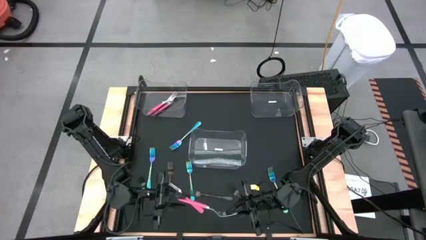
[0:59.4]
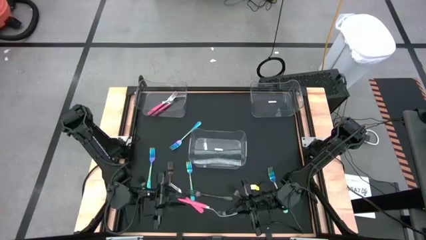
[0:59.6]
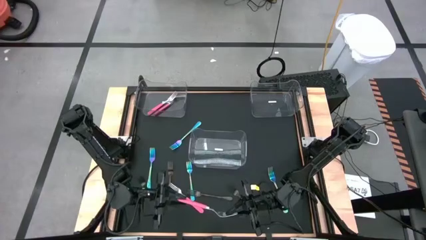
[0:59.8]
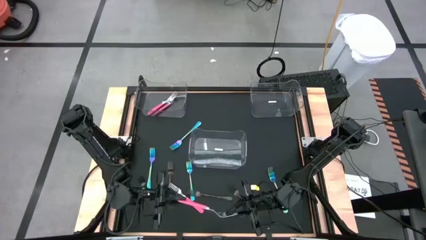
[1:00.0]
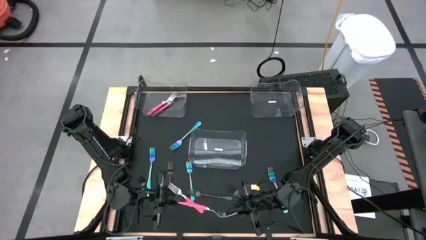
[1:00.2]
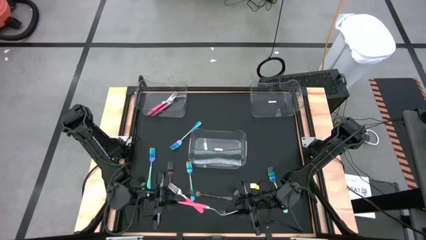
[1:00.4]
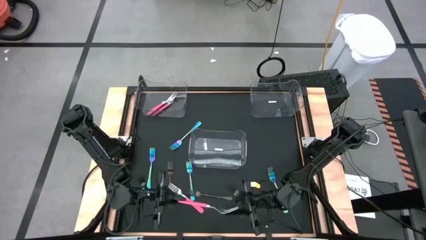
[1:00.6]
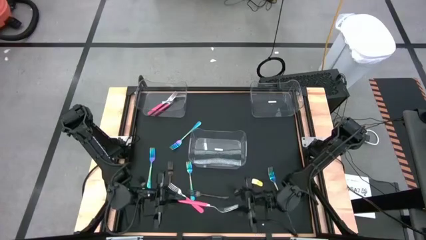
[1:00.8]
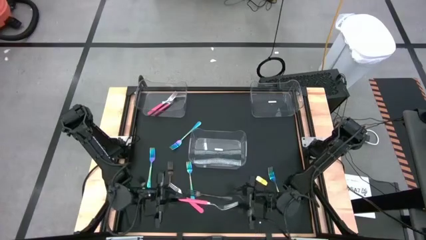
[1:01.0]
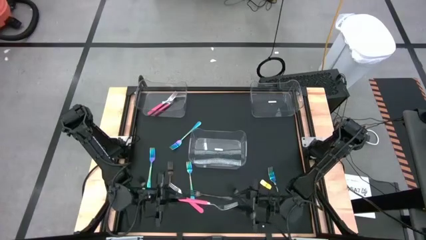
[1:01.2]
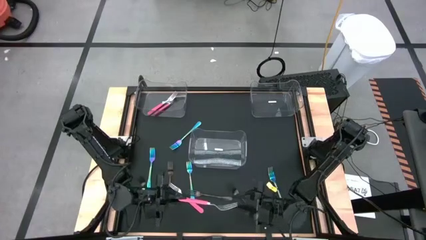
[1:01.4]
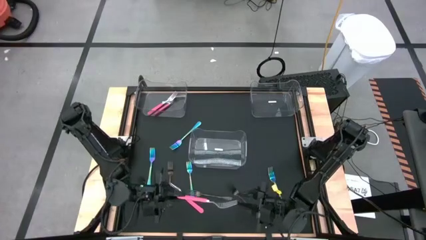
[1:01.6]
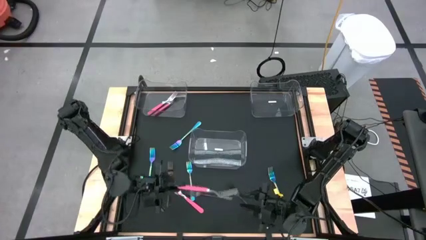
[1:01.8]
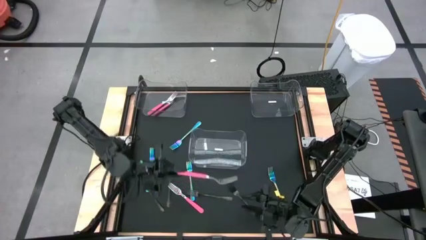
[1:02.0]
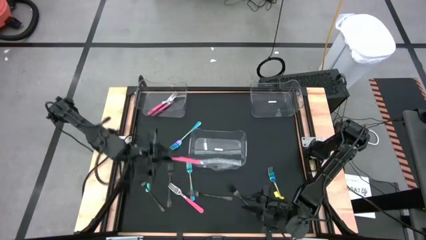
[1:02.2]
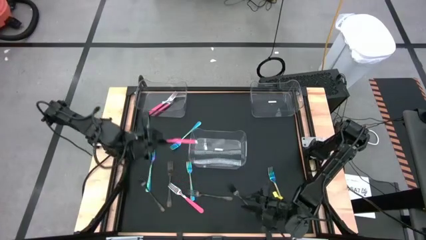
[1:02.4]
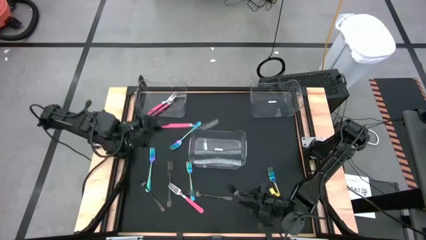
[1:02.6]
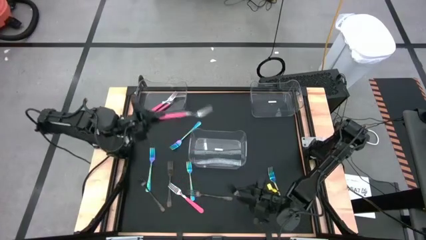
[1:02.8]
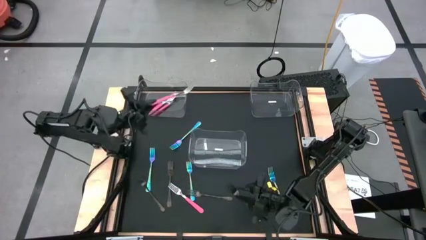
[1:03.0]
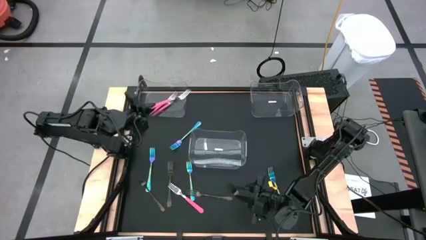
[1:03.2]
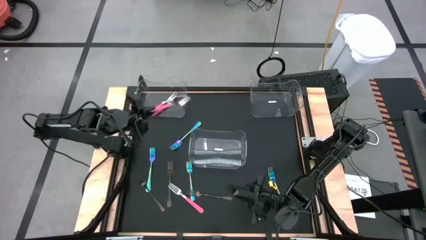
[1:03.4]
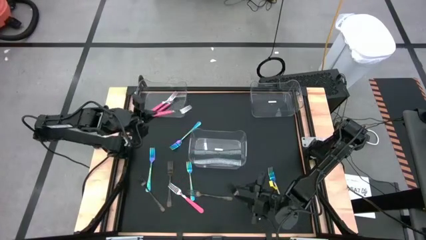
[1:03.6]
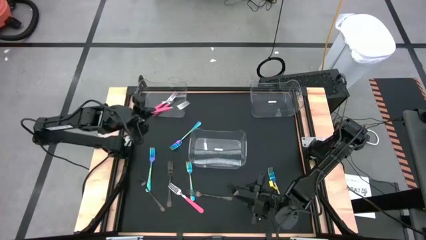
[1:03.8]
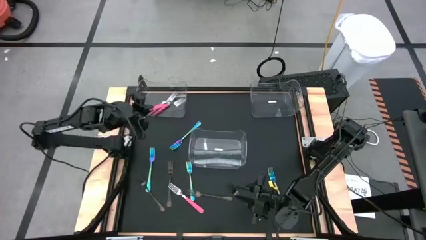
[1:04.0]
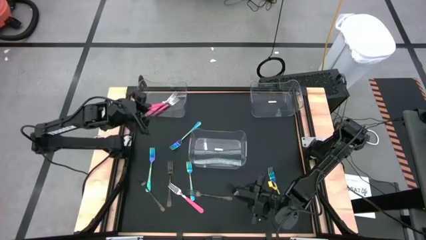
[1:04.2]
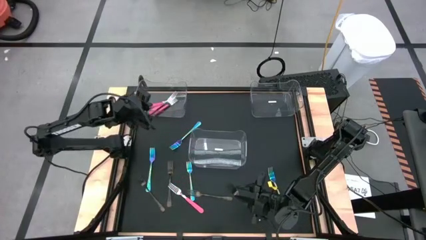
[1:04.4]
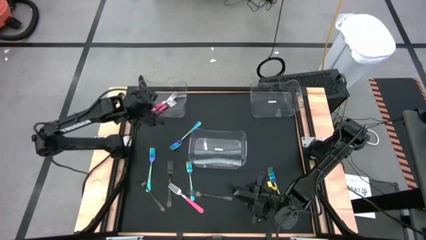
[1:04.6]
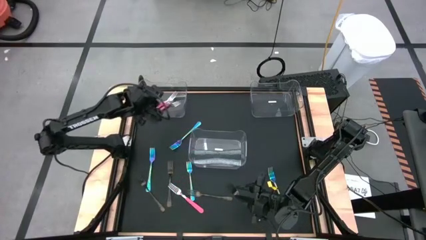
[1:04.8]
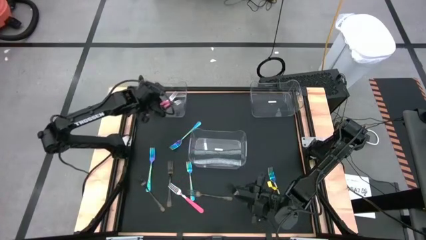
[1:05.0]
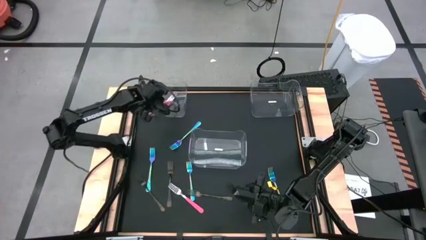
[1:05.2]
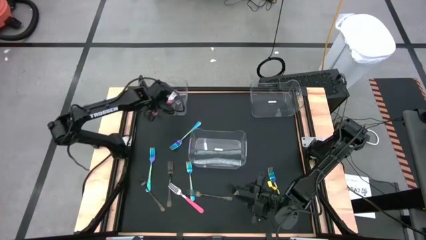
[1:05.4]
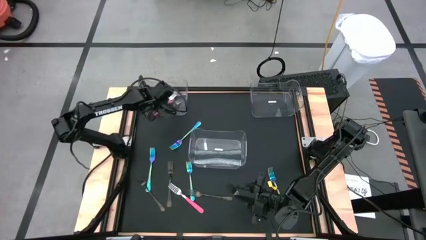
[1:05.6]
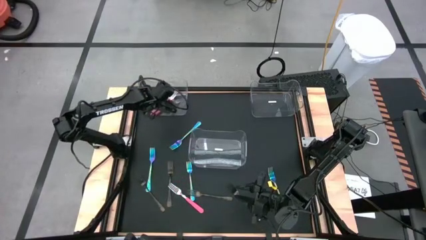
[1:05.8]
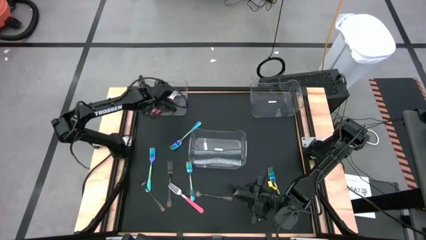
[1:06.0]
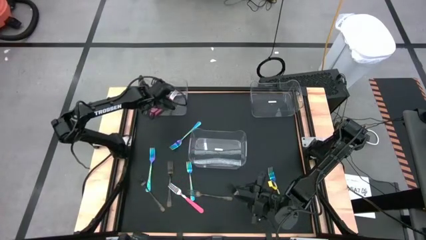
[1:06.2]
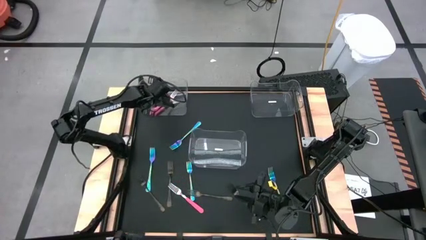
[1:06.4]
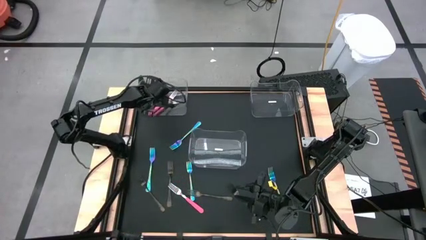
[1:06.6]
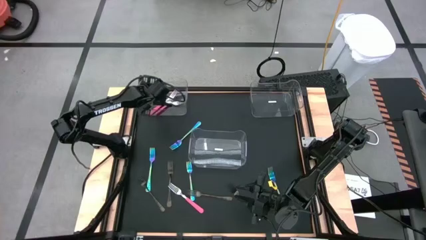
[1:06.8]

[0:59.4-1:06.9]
Task: Sort silverware by color (type)
Put the pink fork into the left transparent bin

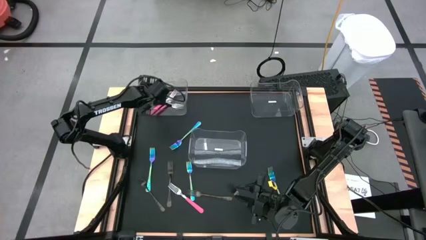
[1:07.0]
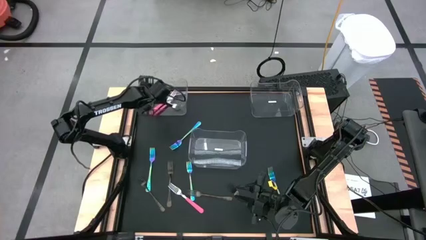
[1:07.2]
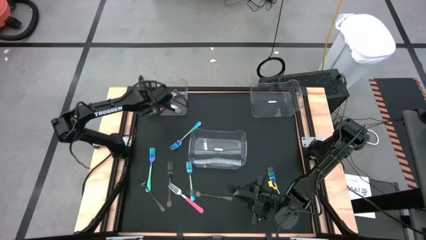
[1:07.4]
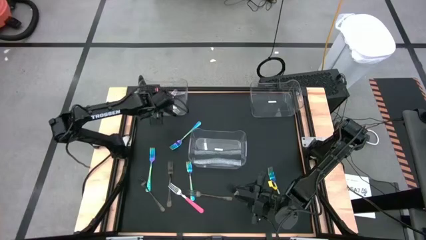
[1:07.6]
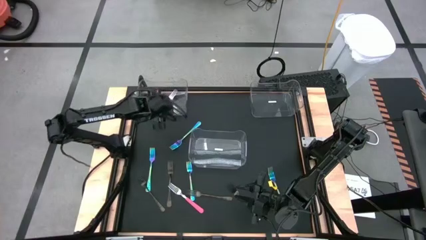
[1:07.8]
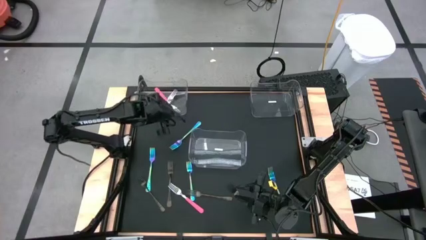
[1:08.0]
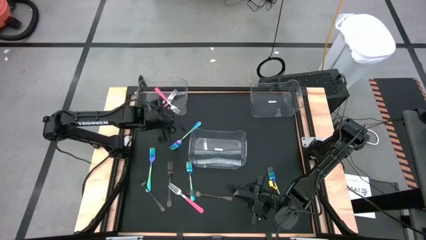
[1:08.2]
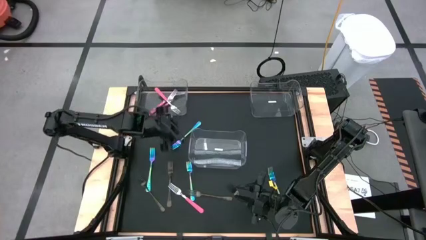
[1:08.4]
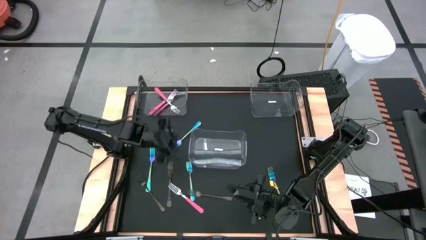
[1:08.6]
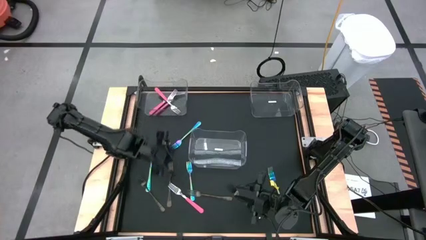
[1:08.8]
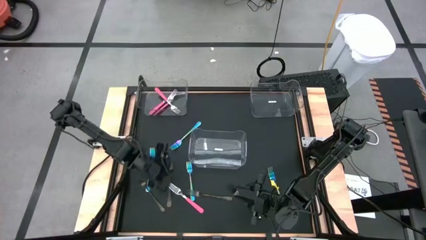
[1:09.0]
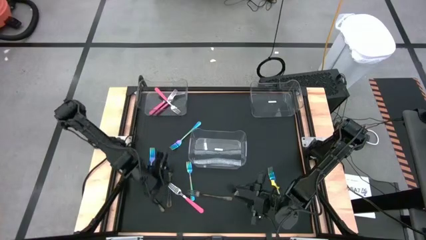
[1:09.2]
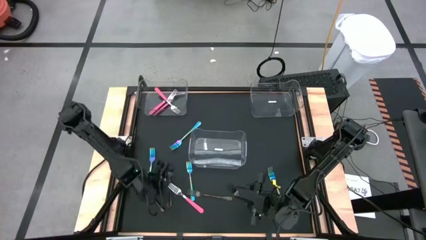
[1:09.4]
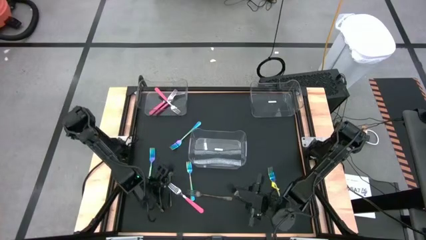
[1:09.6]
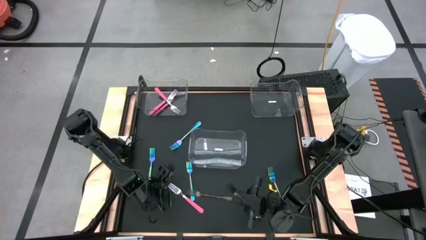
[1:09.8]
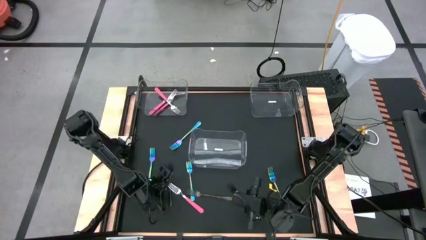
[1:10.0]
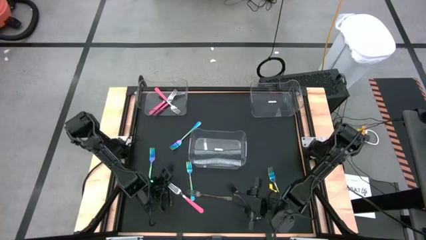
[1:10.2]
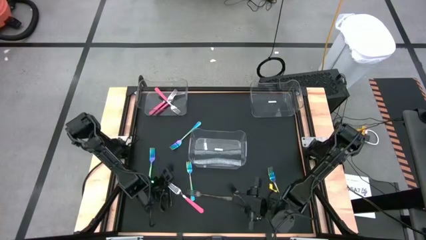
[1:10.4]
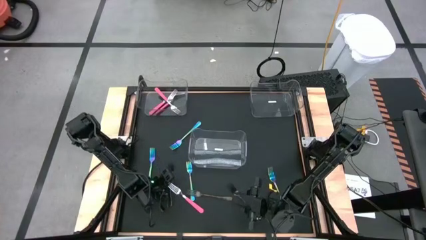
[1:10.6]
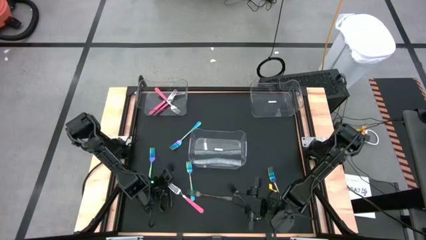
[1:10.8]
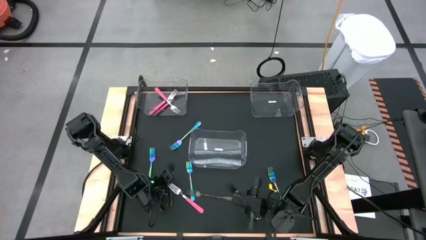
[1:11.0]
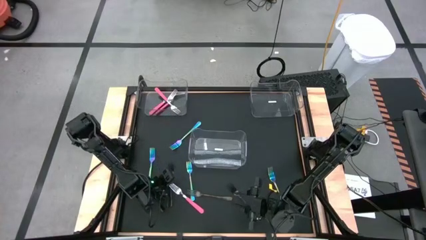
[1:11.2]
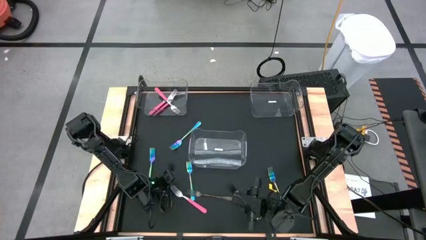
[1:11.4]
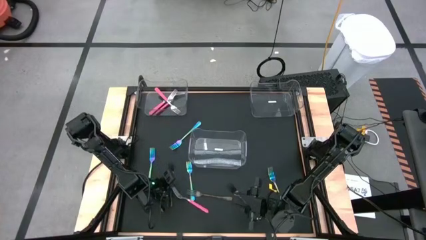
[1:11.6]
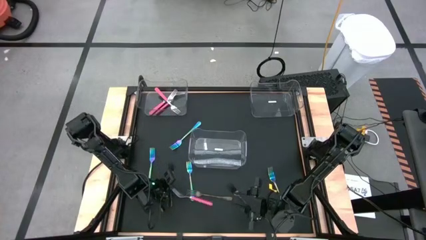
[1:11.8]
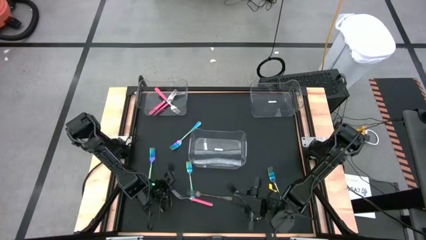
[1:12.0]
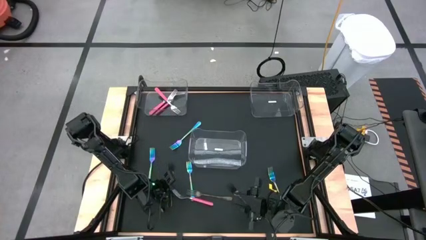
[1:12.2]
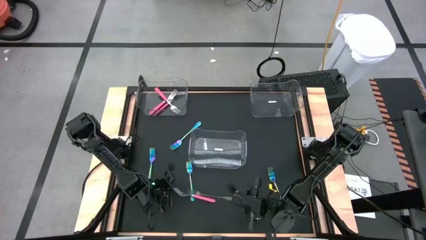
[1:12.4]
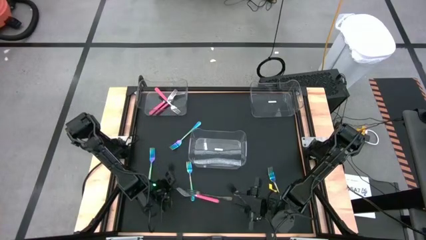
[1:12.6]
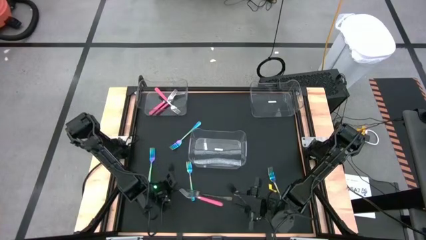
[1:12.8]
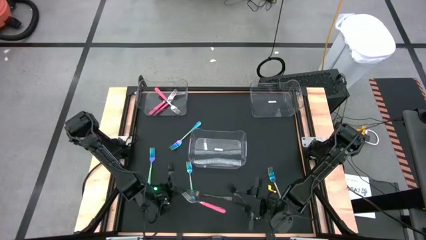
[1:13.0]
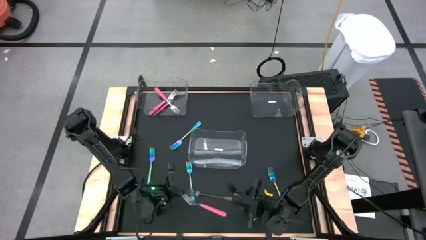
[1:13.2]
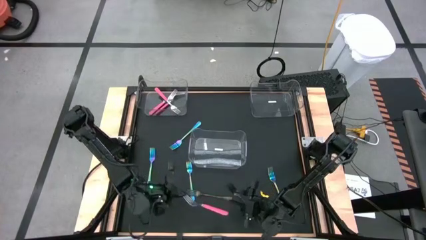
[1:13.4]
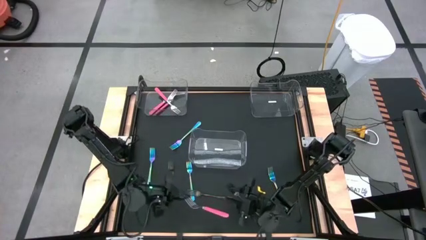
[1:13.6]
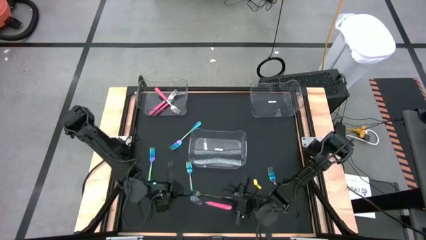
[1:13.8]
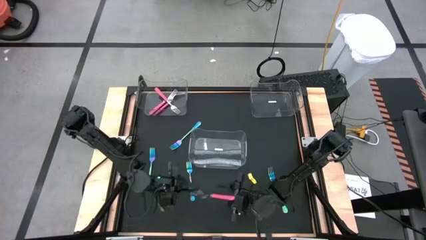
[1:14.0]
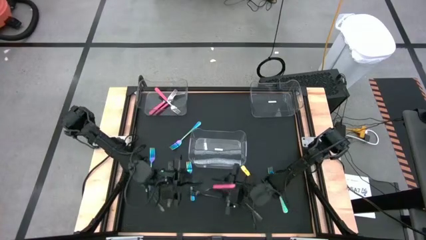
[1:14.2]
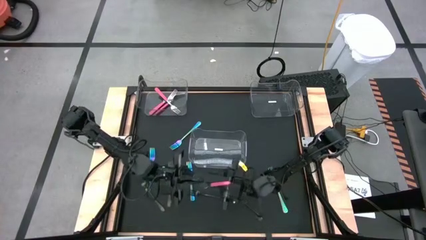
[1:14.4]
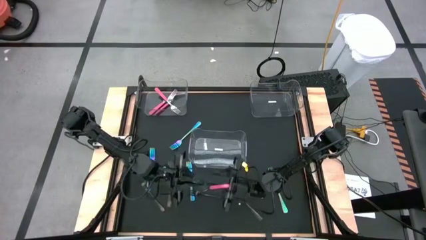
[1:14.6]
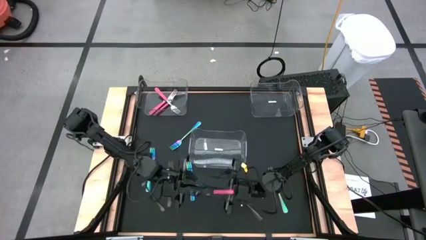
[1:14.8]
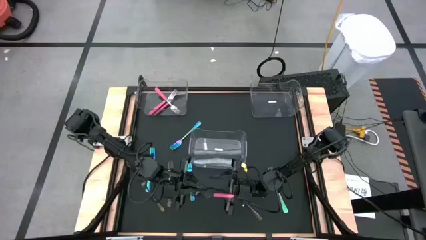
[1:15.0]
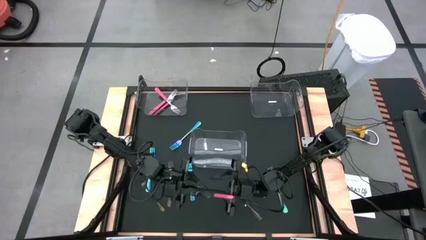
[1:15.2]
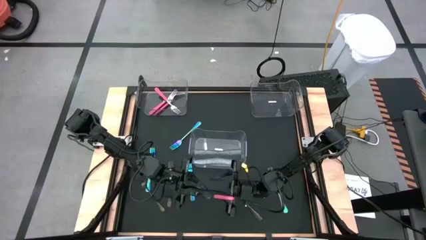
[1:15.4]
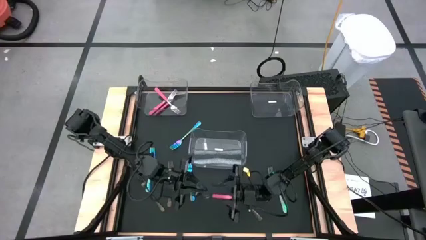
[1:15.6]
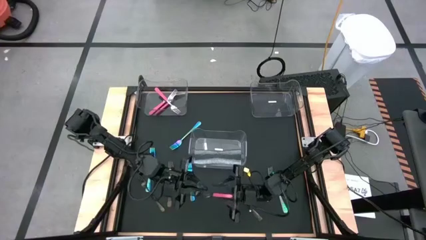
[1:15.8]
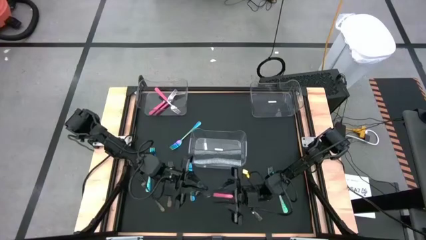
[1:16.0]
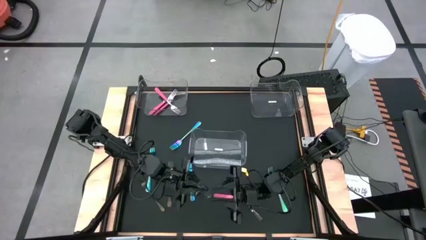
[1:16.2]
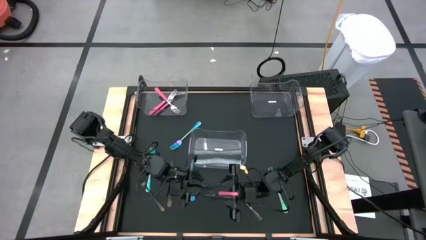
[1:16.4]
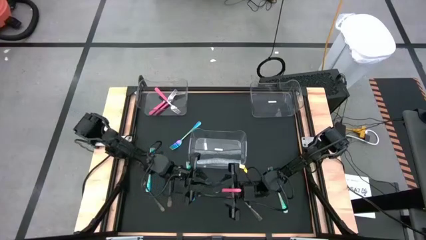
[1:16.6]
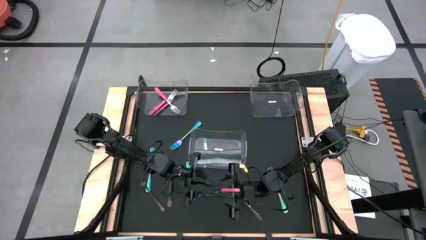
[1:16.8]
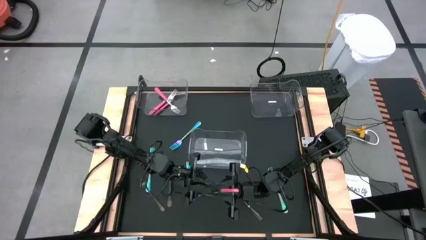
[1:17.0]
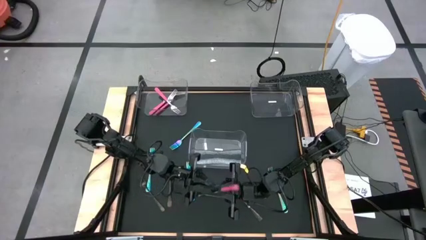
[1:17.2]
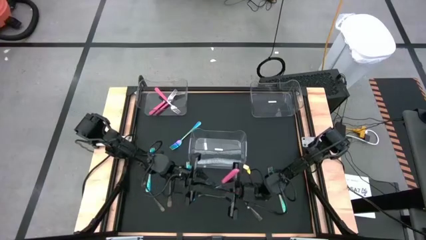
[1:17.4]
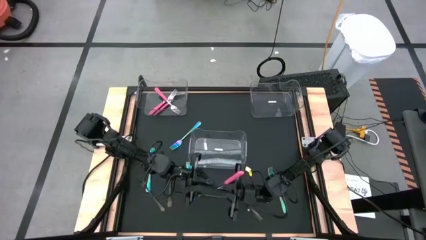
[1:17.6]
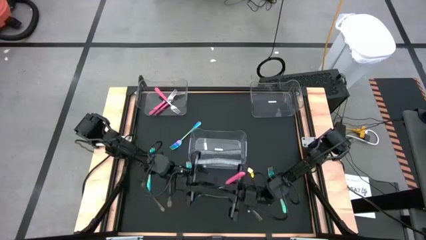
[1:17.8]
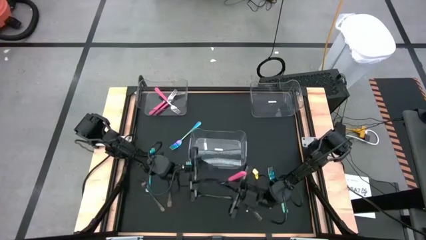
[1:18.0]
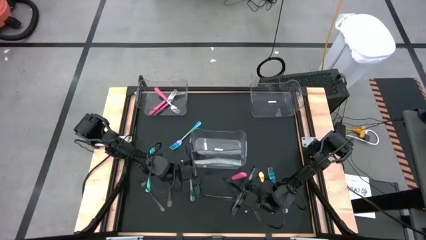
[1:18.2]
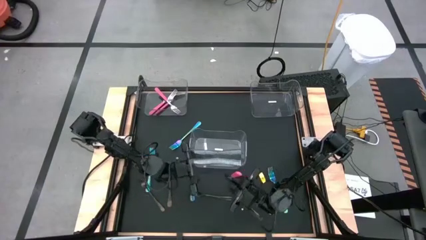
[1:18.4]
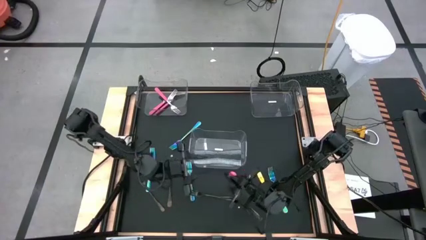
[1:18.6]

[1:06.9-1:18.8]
Put the pink fork into the left transparent bin
